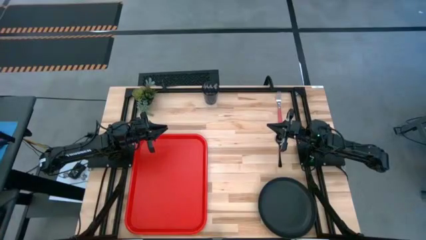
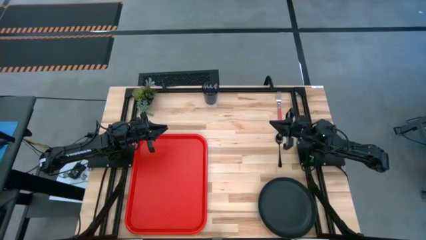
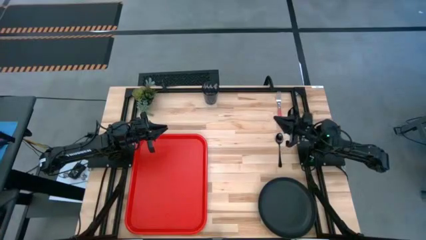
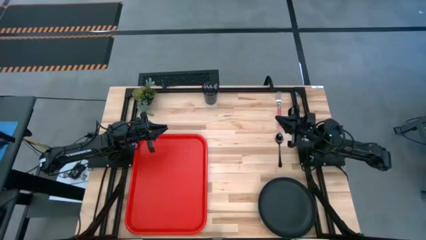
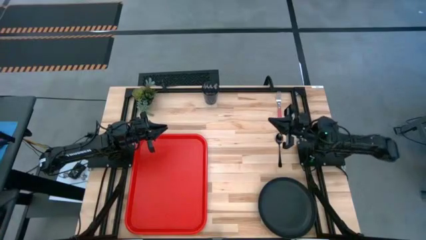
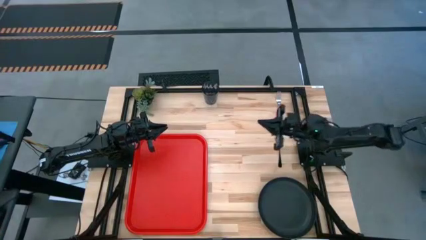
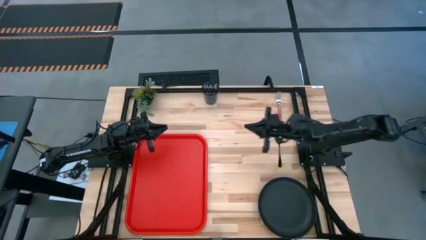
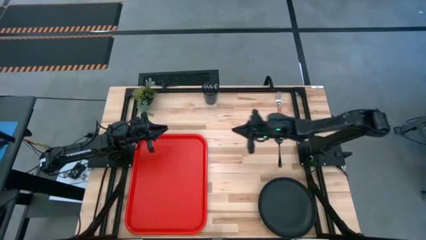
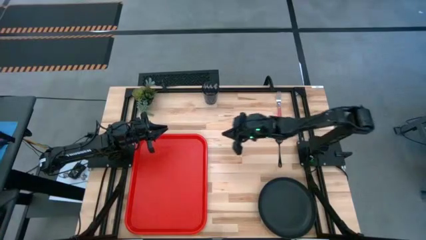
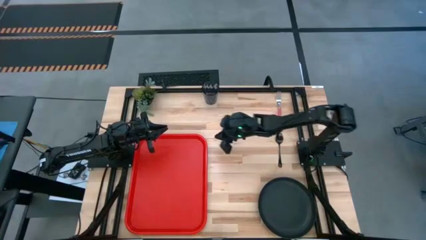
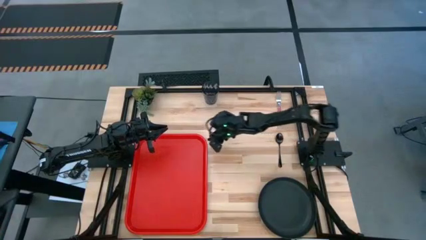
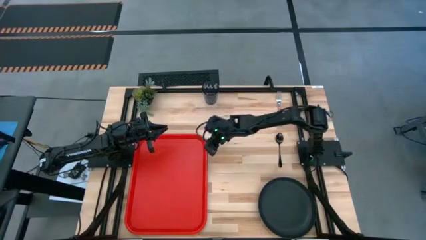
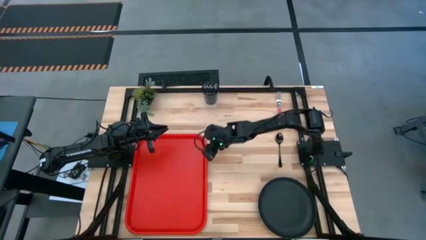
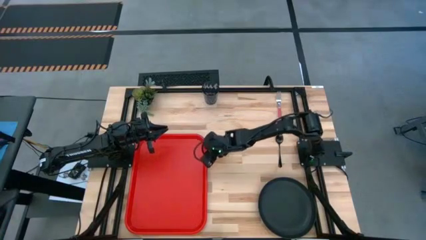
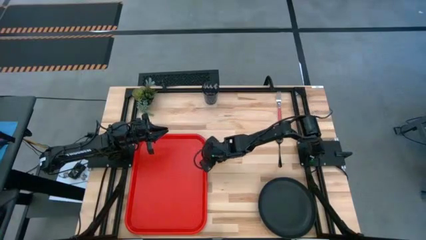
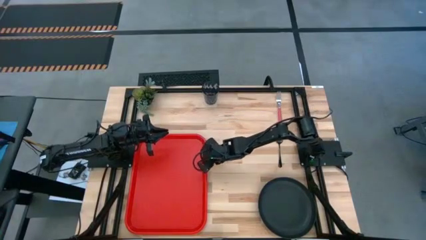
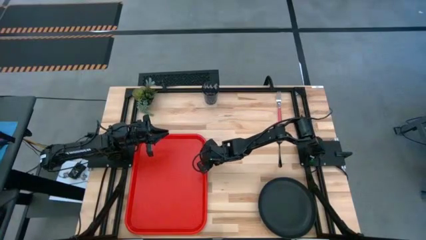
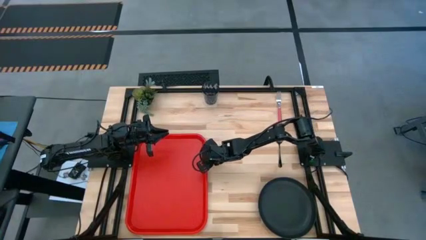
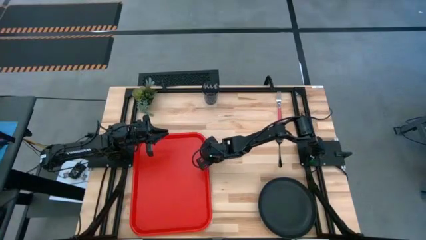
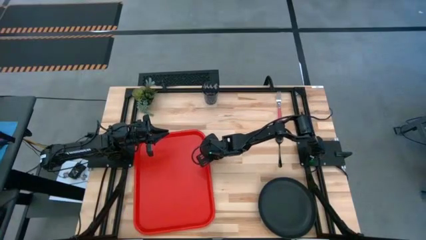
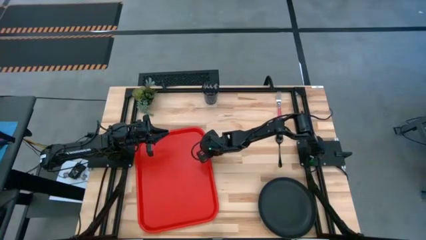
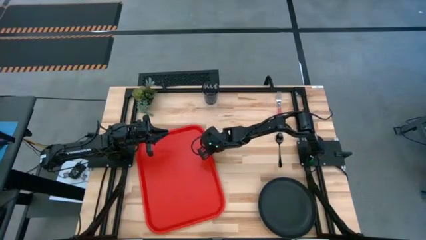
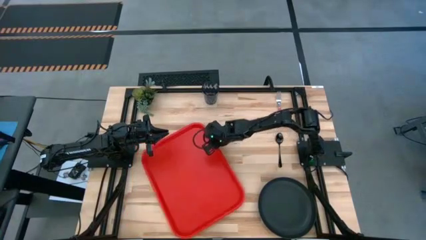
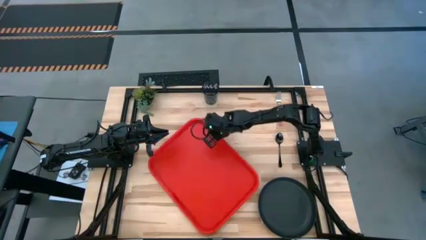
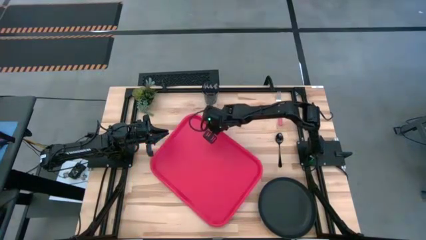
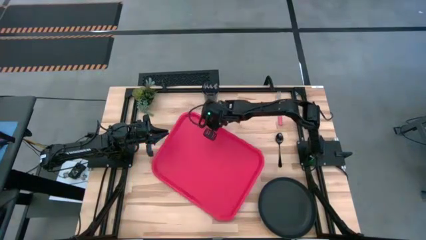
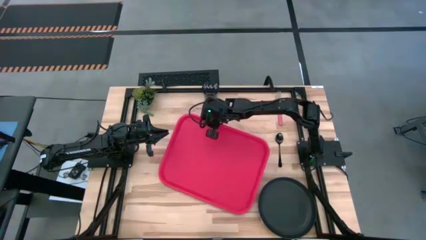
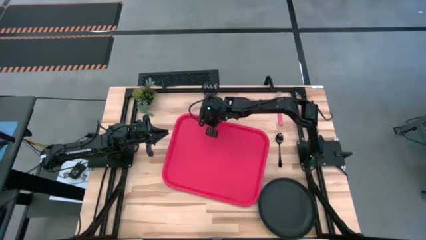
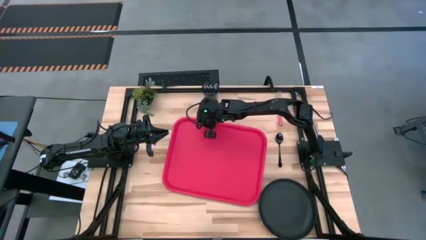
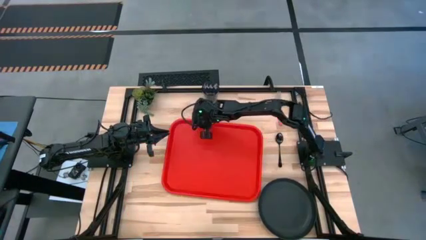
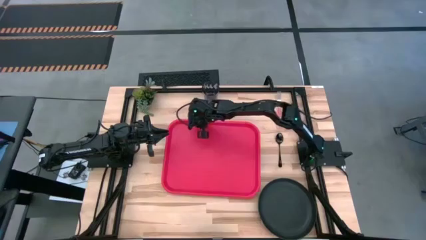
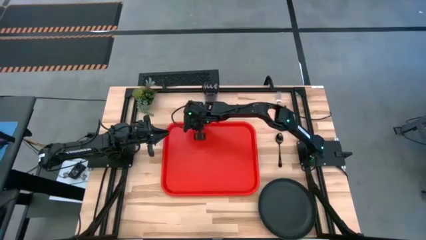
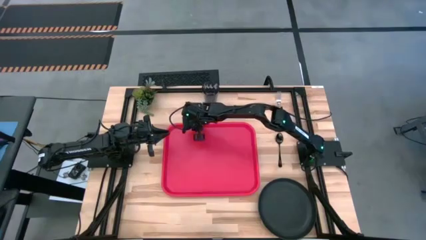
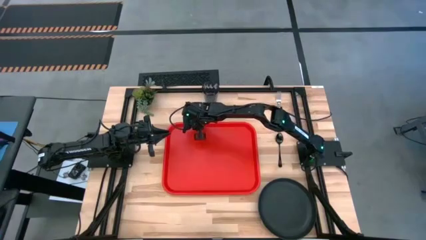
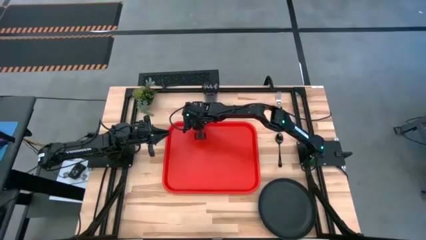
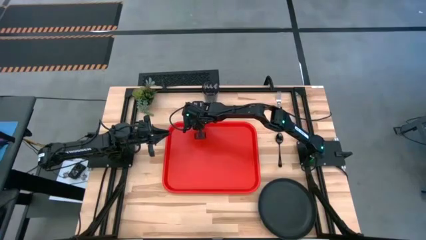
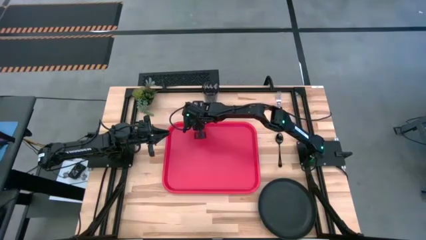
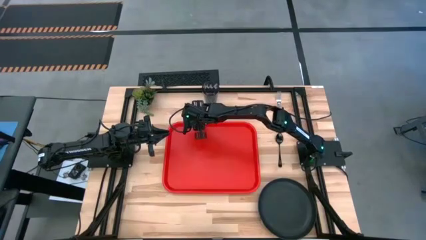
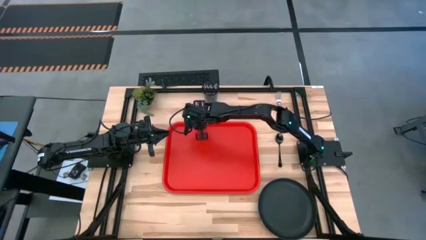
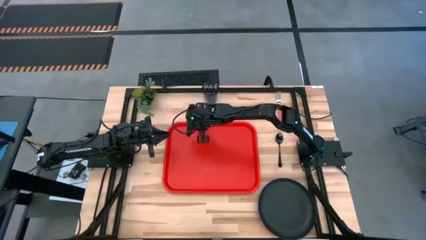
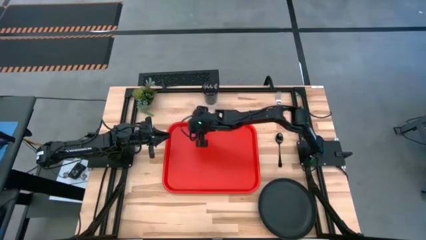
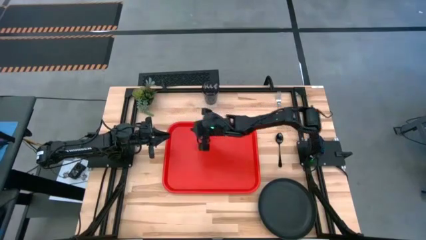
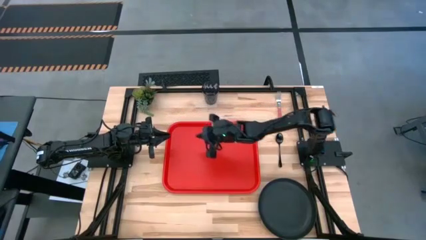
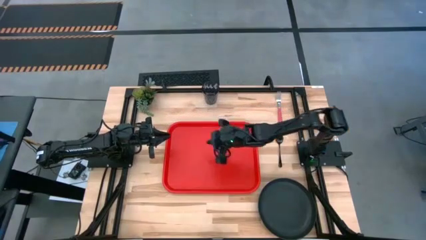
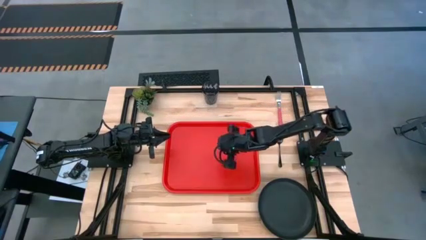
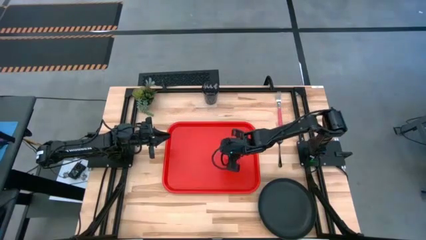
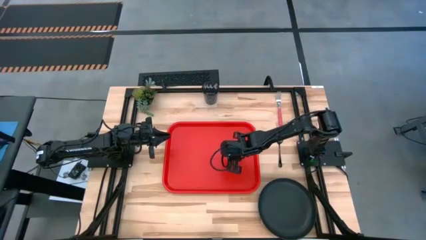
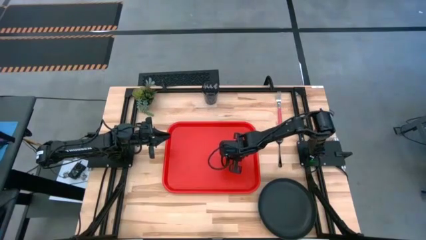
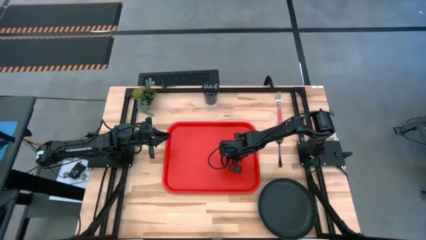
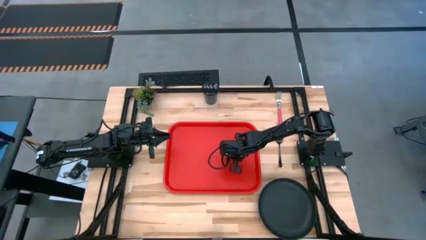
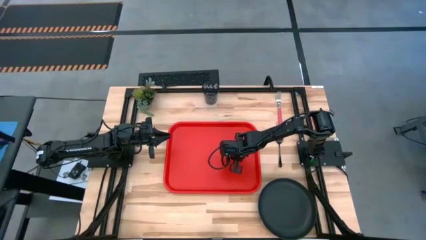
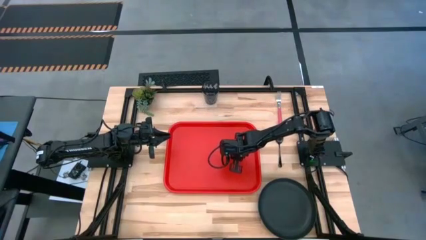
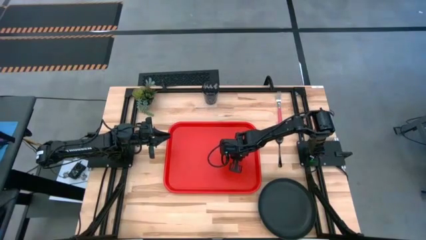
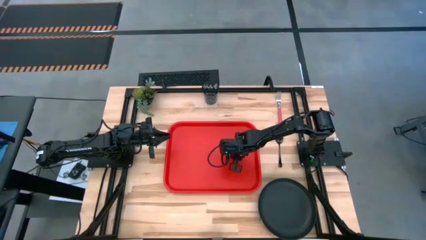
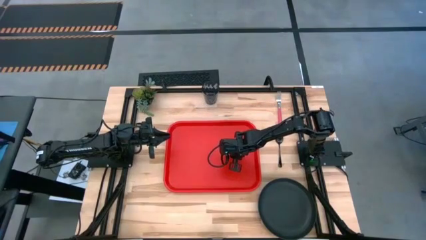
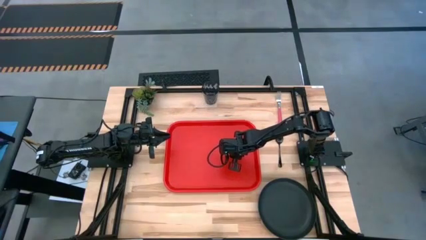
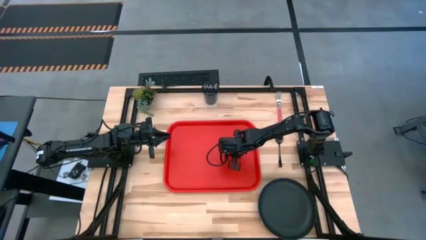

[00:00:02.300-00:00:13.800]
Task: Pick and place plate/cup/fork/spoon on tray
Prepare the red serving tray for the center of the table

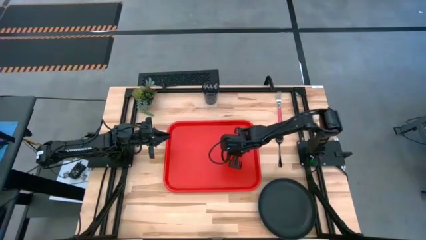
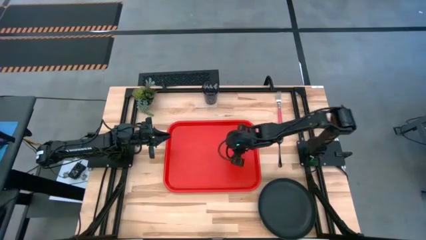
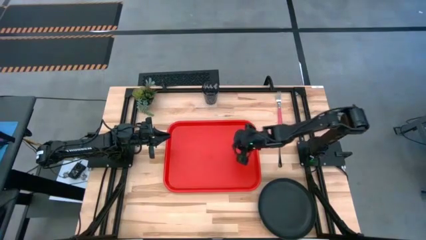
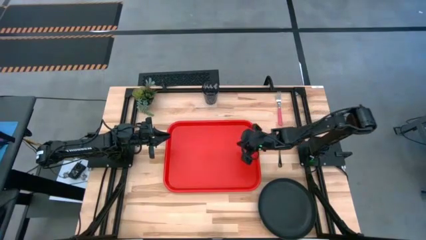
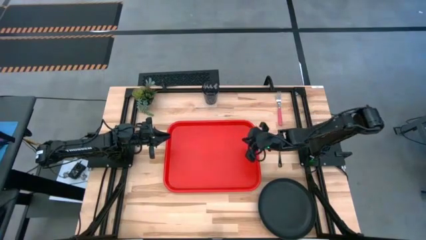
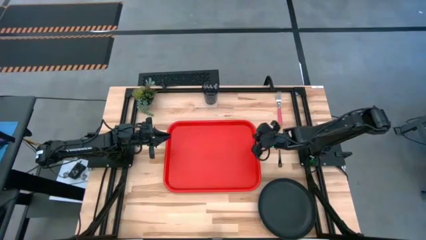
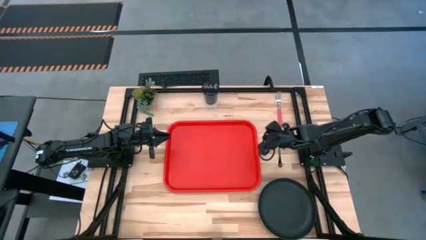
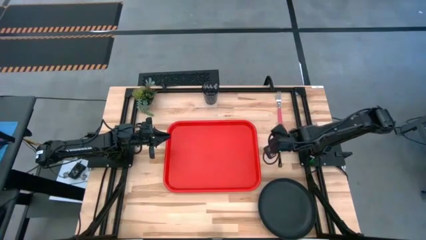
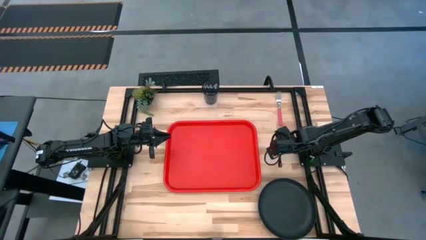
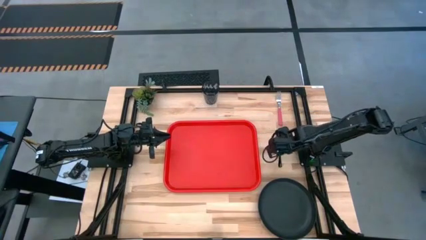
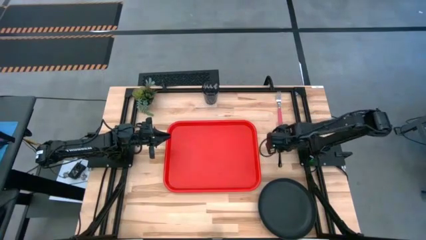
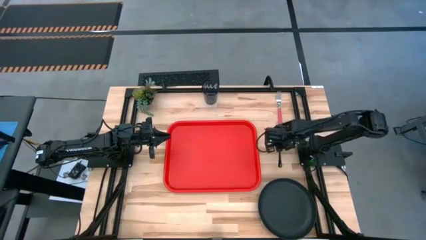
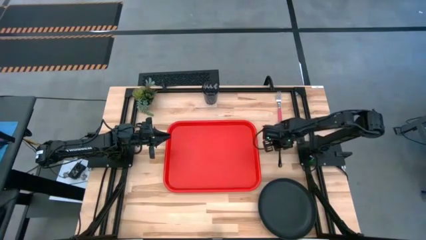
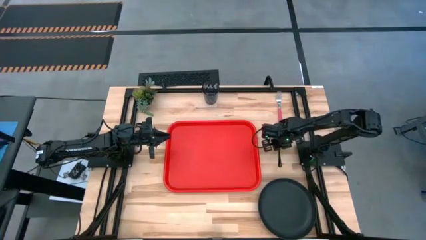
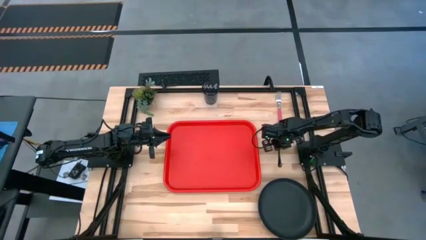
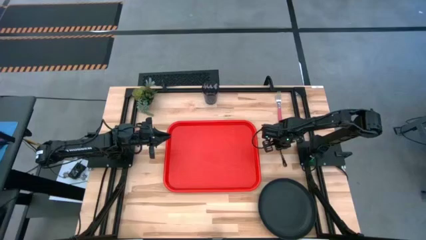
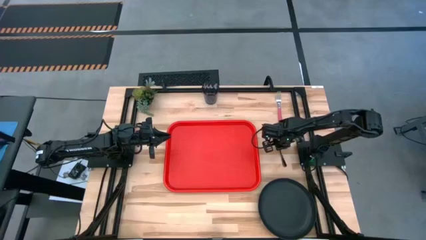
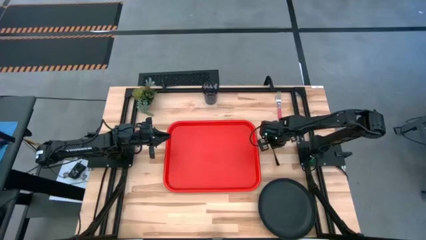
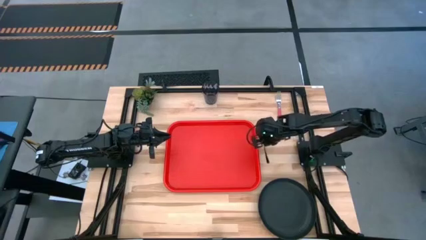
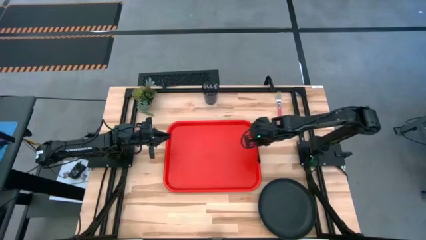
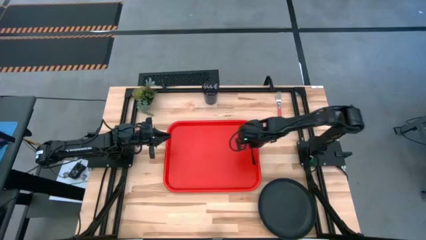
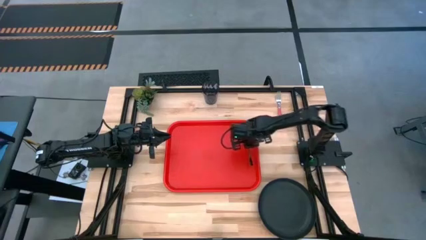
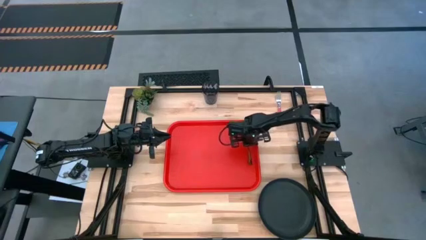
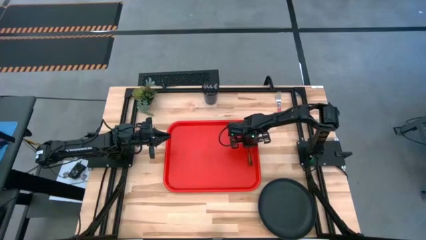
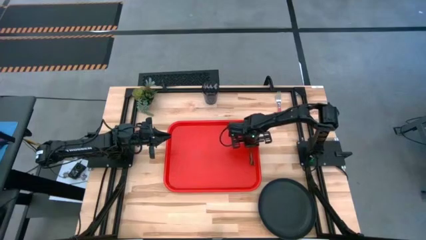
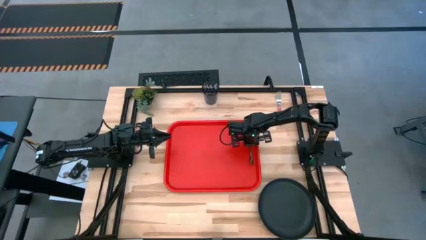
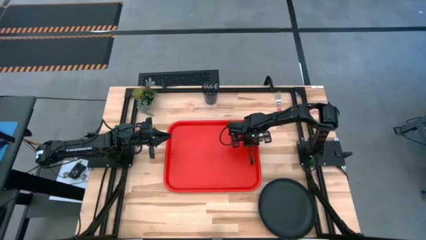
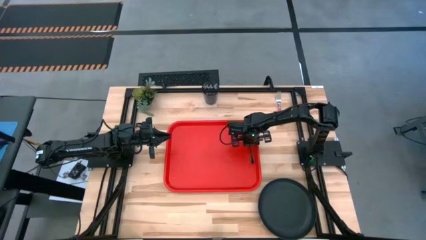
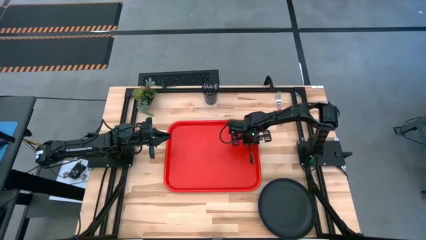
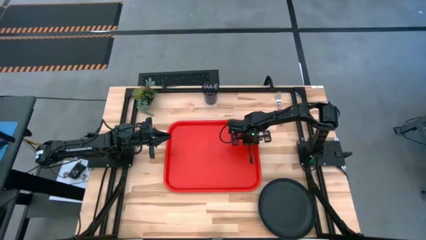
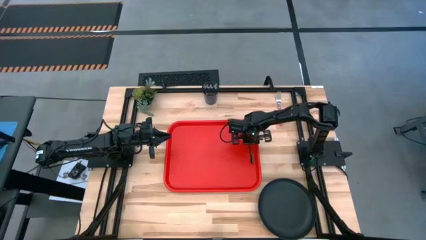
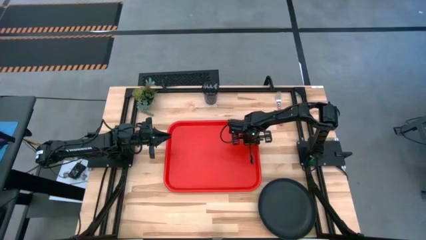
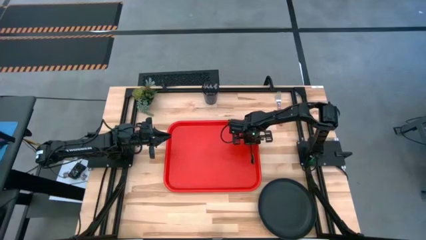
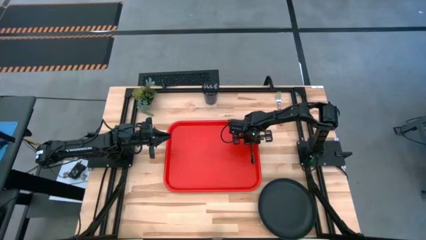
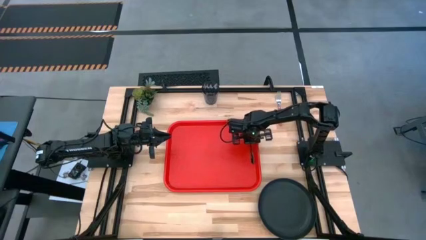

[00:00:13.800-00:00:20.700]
Put the black spoon on the right of the red serving tray
